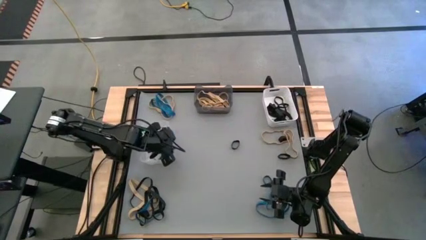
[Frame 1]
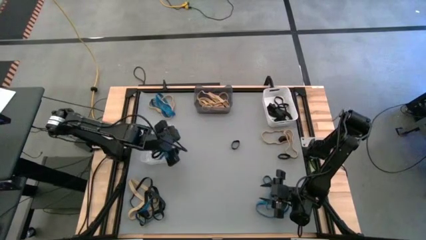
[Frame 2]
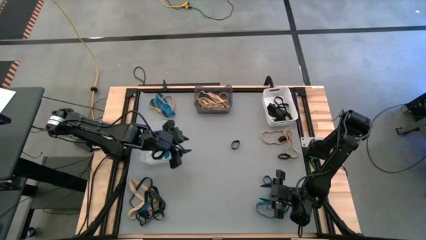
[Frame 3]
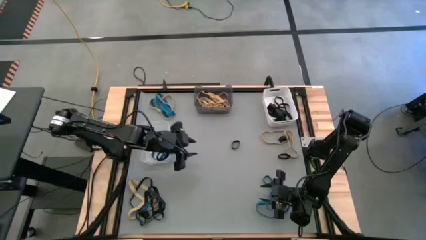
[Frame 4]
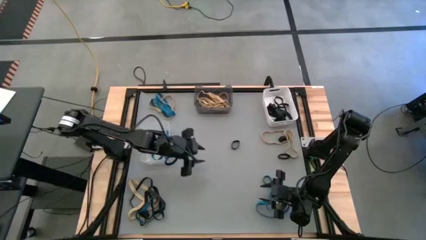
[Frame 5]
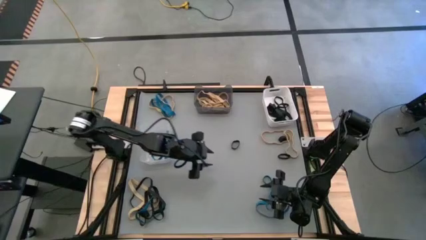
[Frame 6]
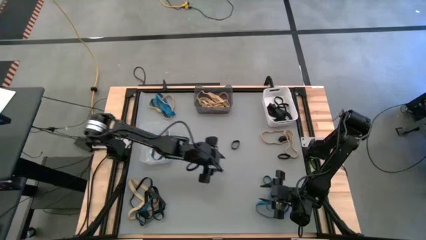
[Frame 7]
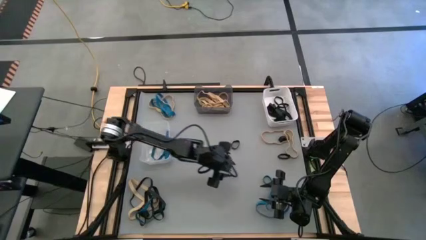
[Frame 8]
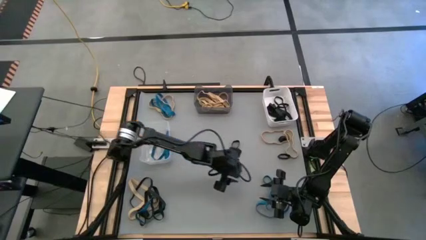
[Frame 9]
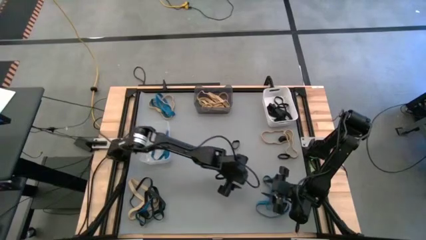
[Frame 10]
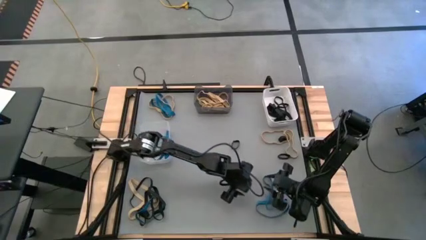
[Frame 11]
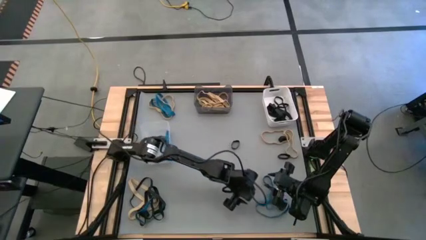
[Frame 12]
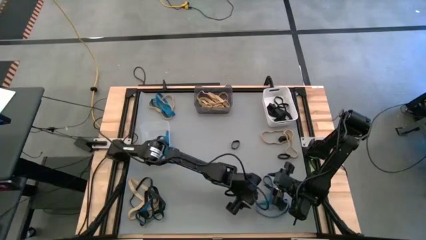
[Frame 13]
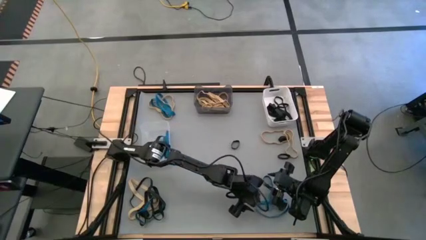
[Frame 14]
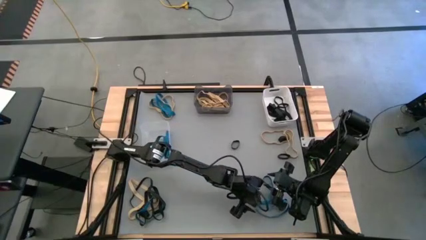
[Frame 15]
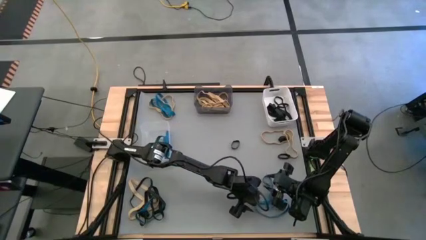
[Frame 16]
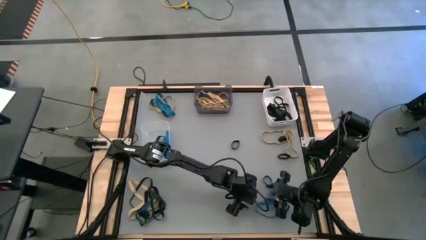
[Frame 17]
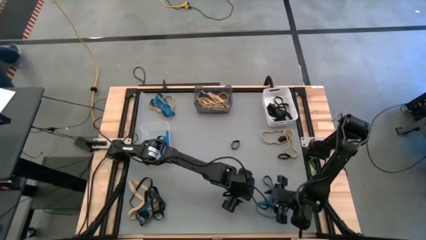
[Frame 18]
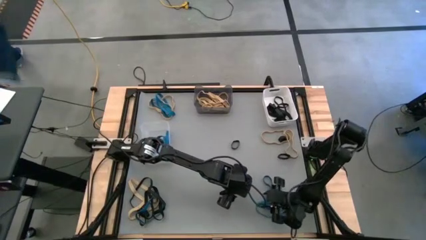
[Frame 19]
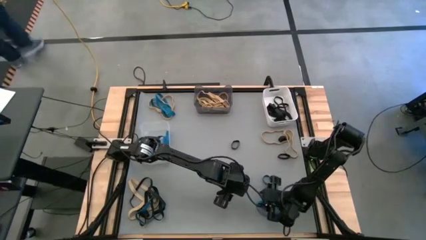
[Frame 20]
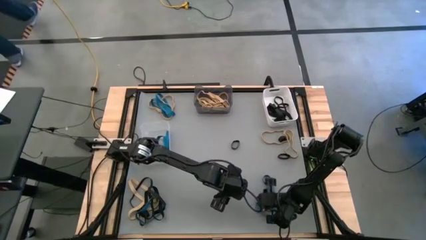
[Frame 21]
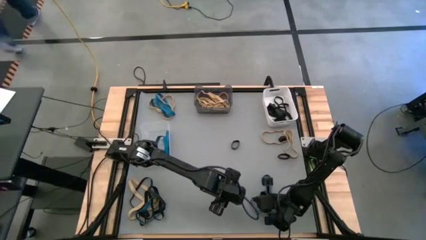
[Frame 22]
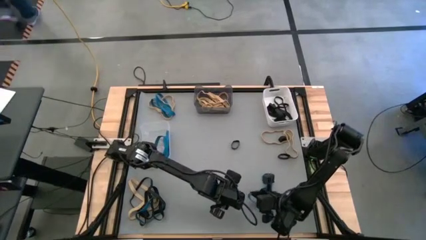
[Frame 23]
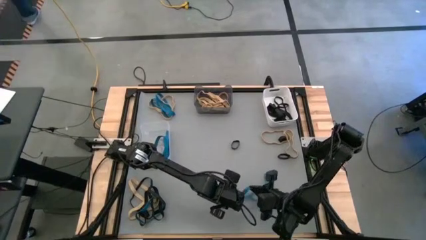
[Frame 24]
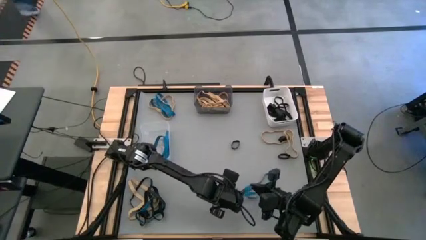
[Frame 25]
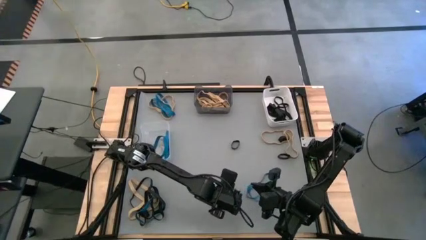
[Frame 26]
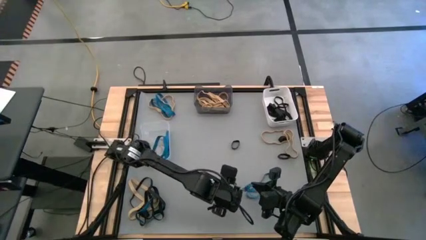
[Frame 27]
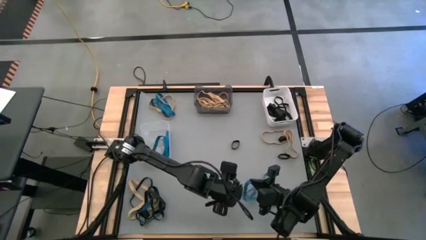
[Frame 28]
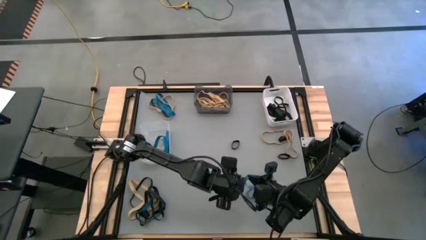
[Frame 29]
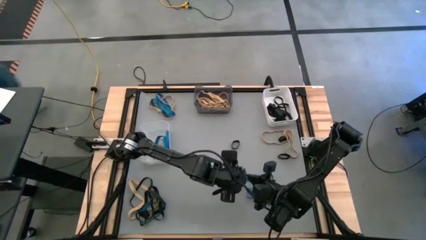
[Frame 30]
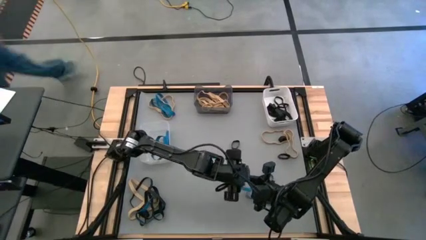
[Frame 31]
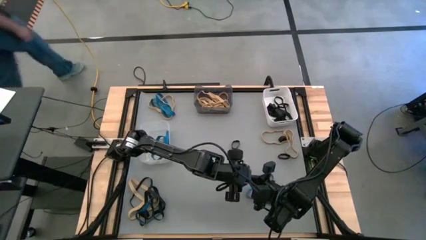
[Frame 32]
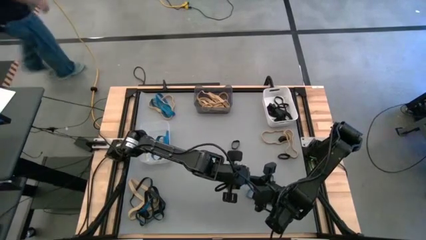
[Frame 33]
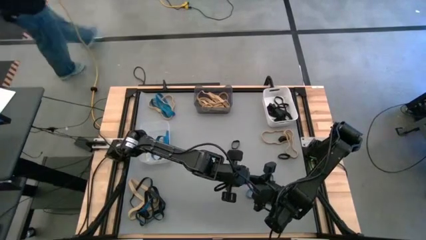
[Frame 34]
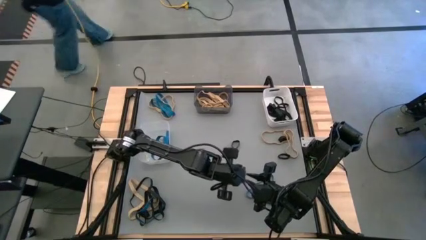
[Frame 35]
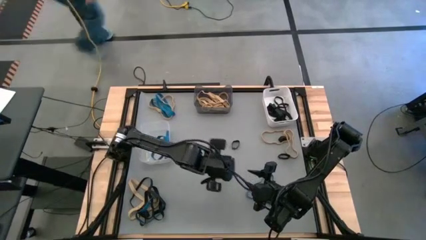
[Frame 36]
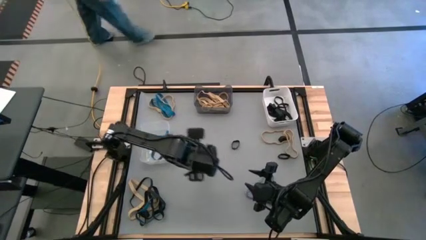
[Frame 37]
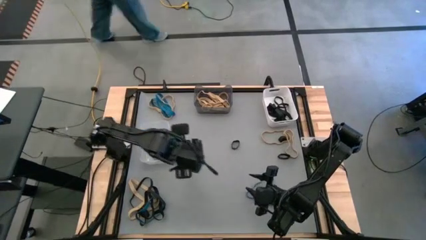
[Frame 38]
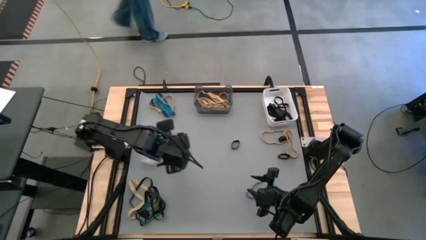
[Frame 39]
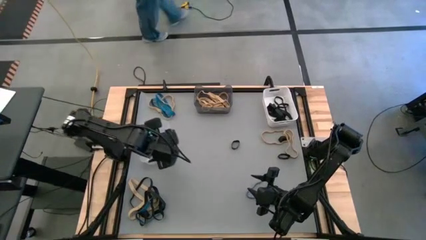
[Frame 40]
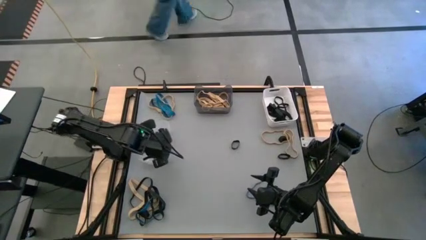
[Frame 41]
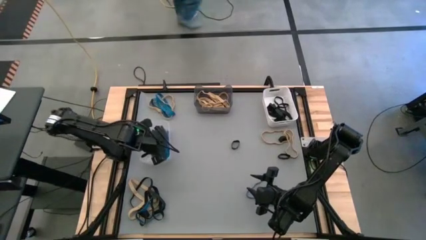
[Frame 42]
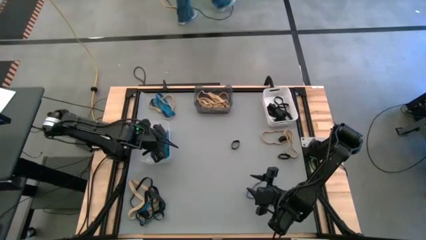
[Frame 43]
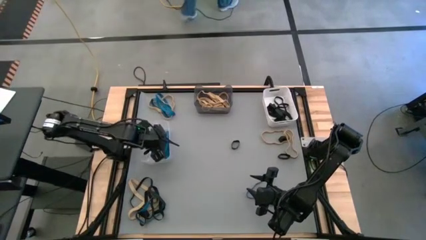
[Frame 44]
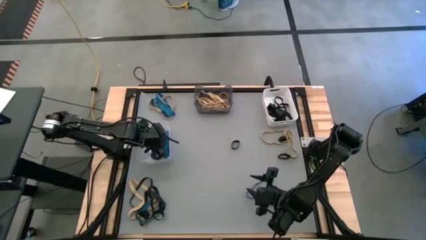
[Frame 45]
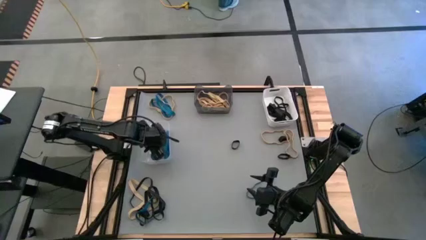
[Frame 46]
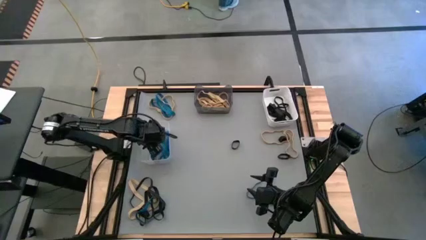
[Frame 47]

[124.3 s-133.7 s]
Task: Sort rubber bands into baskets
Put the blue rubber band into the transparent bin

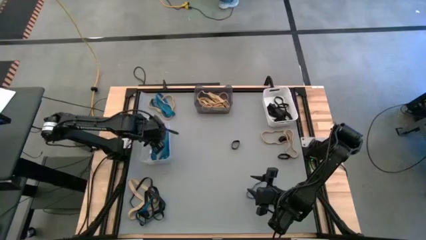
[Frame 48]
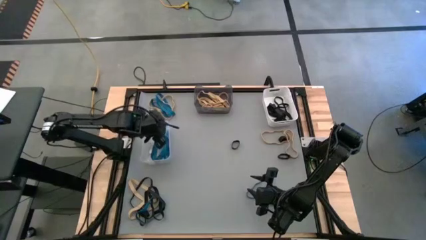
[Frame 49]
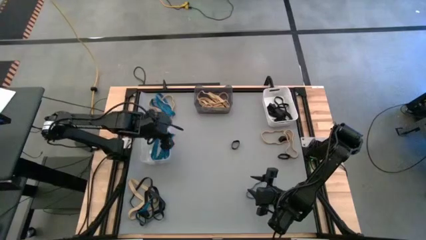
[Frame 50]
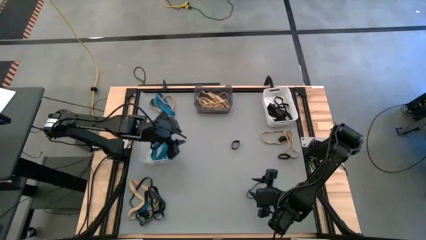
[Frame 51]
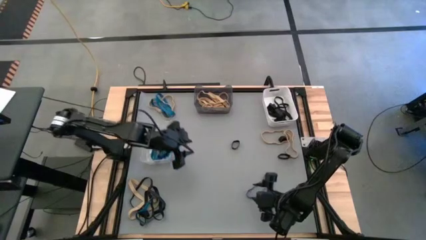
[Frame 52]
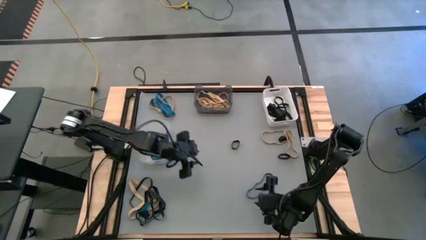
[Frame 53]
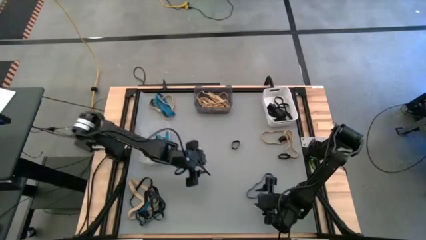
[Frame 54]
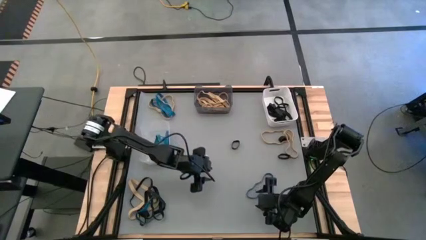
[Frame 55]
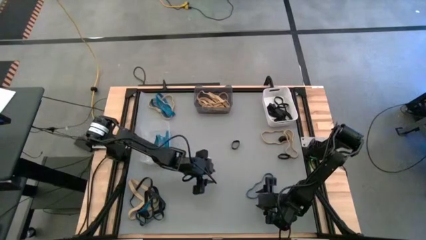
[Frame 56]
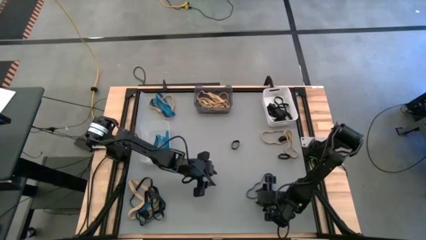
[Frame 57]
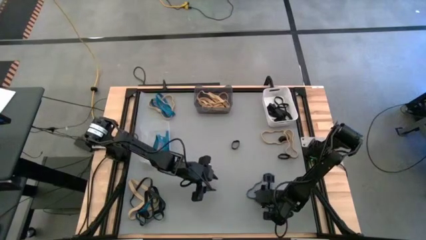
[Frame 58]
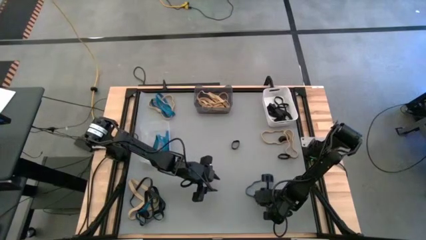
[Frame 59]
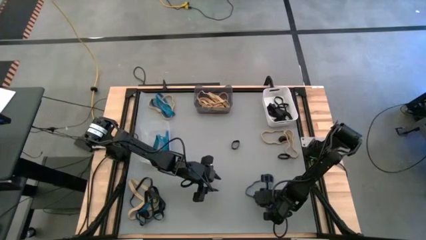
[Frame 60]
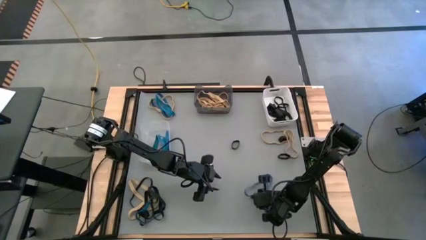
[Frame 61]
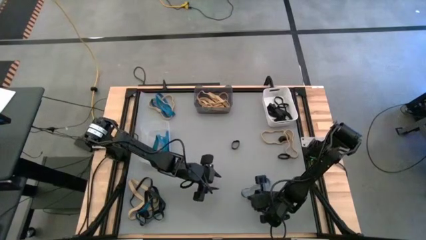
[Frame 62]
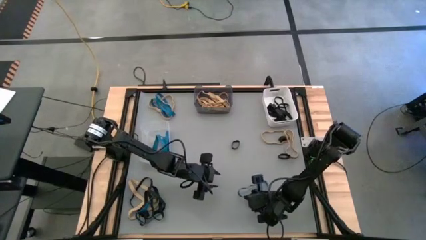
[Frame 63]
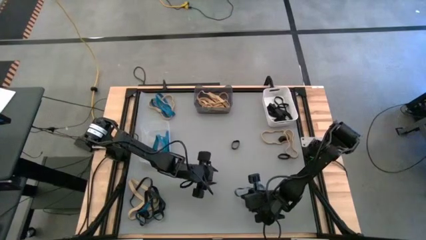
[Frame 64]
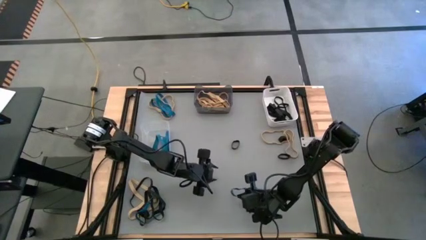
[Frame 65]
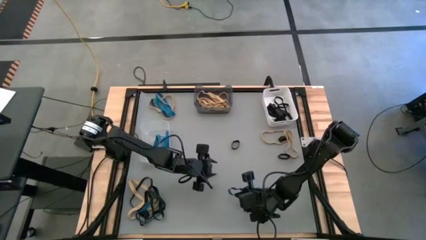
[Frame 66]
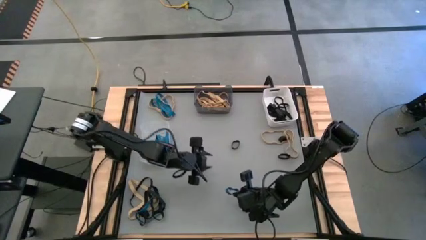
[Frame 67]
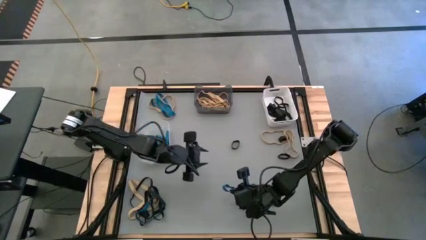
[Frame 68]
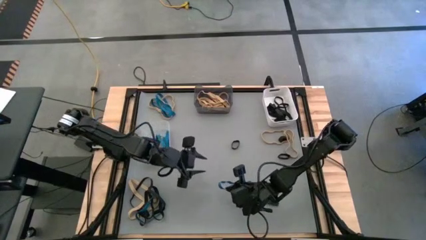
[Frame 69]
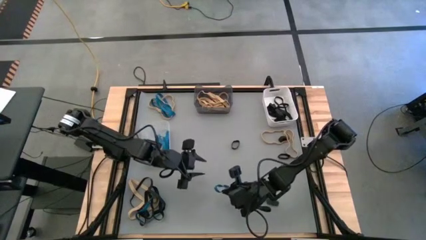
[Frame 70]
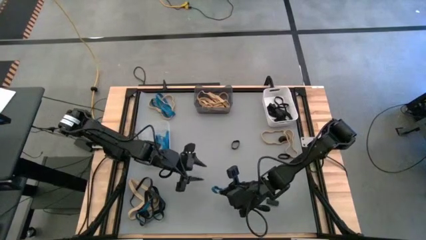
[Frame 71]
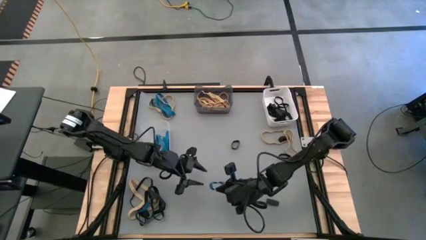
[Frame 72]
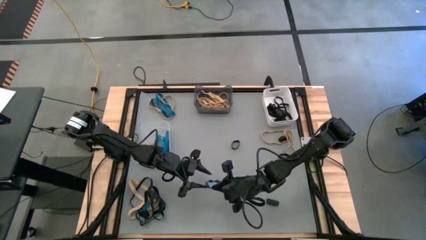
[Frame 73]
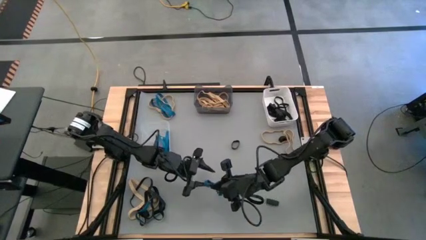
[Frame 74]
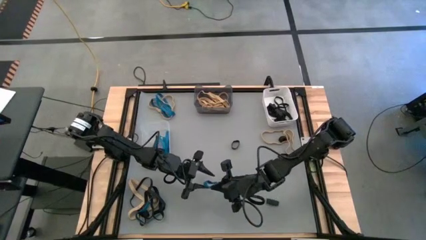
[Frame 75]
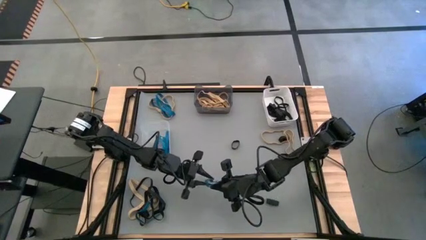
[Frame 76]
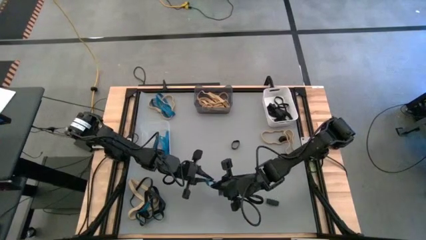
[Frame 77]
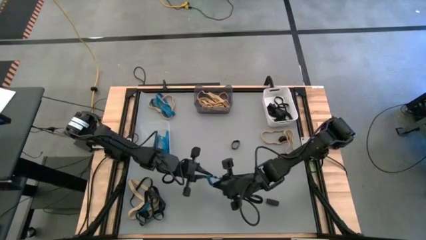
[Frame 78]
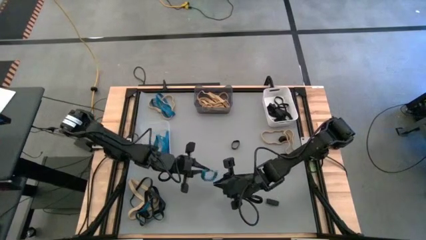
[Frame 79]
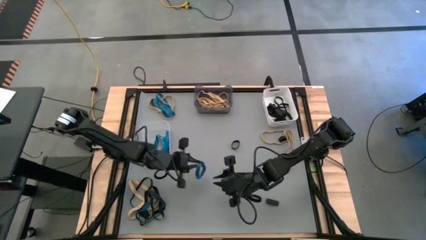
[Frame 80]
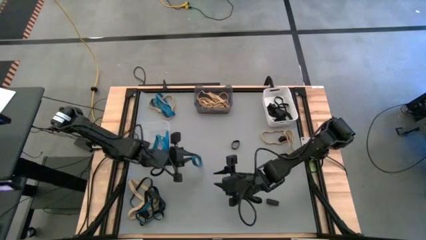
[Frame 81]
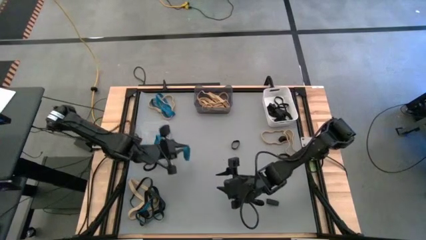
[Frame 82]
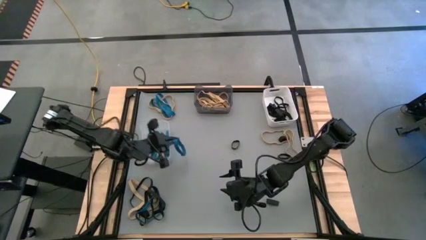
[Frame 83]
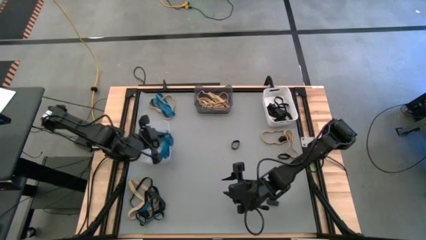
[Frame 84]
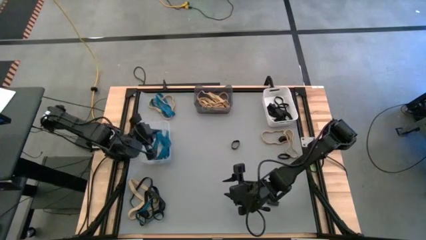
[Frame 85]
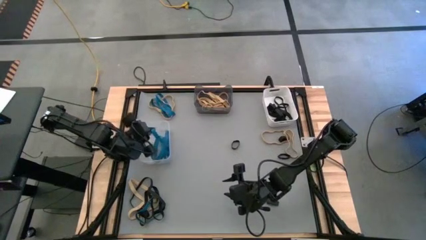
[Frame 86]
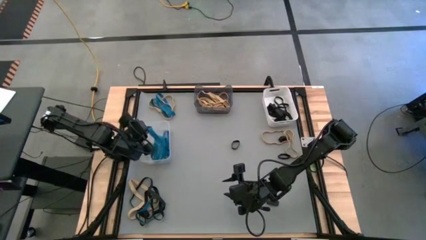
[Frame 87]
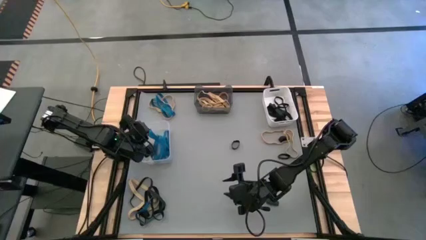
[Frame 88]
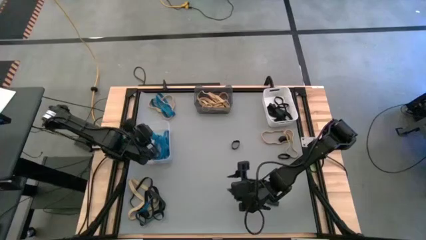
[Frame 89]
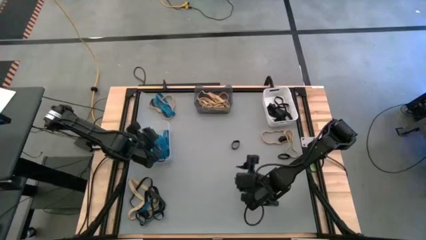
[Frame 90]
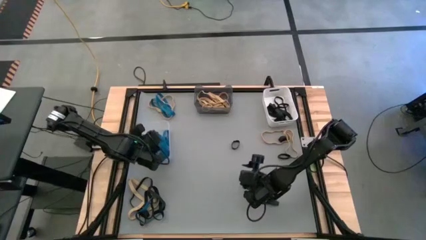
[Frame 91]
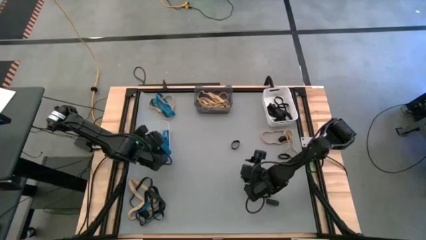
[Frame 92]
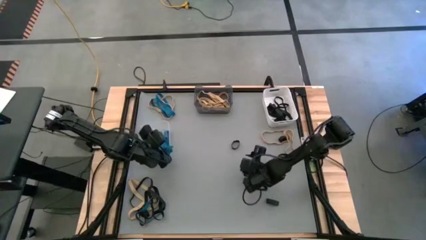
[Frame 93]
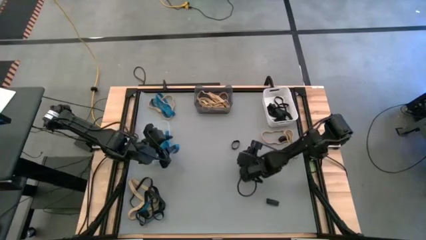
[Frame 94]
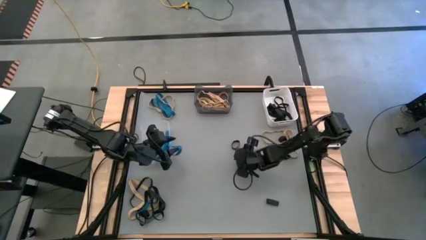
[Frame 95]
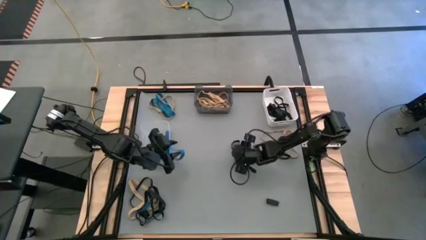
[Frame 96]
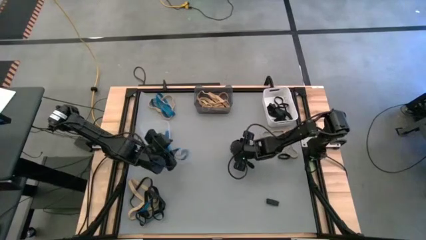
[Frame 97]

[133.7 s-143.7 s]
Put the blue rubber band into the transparent bin
